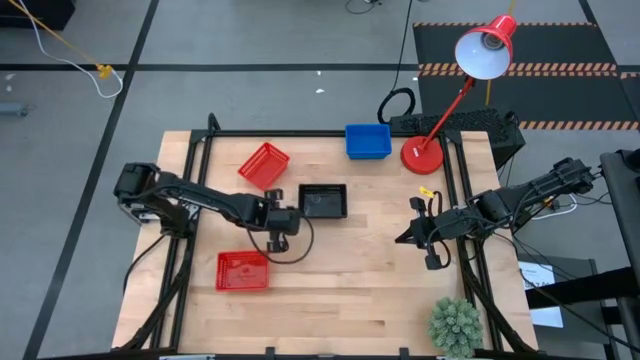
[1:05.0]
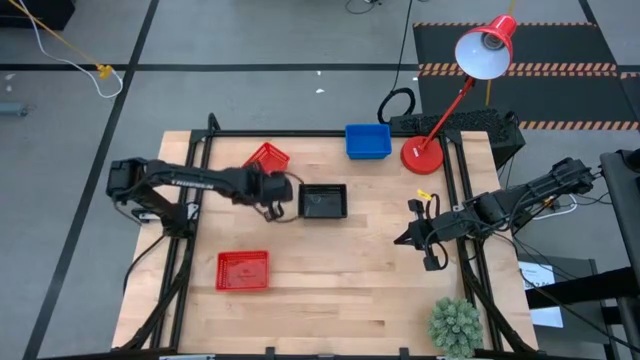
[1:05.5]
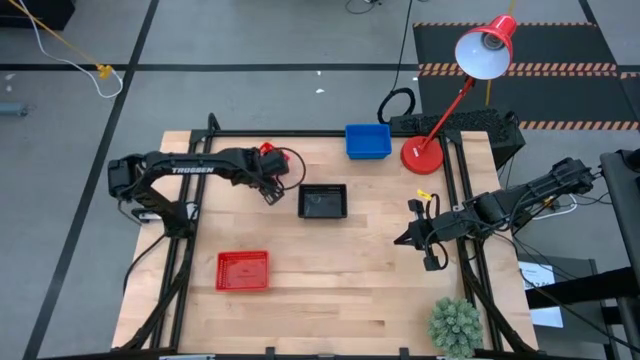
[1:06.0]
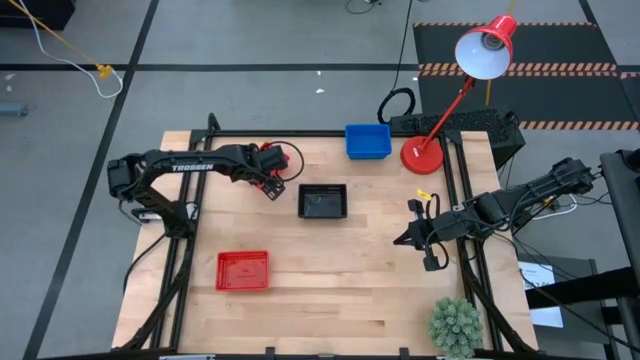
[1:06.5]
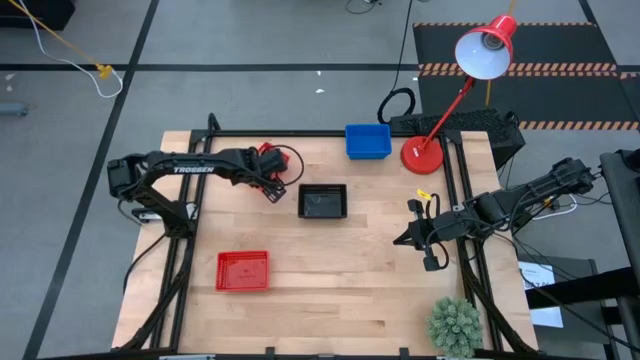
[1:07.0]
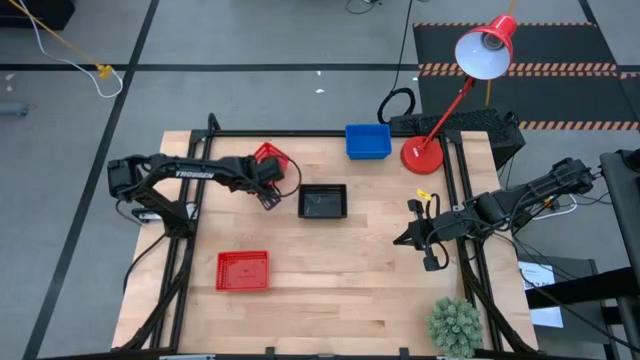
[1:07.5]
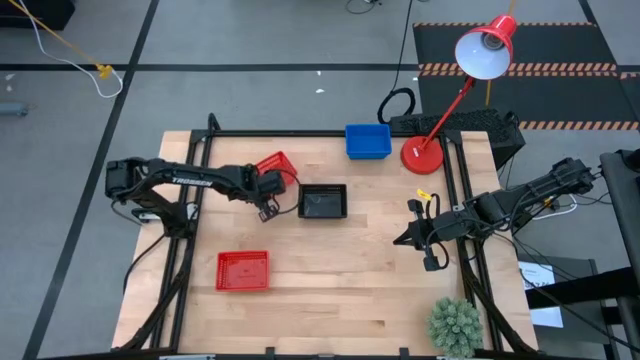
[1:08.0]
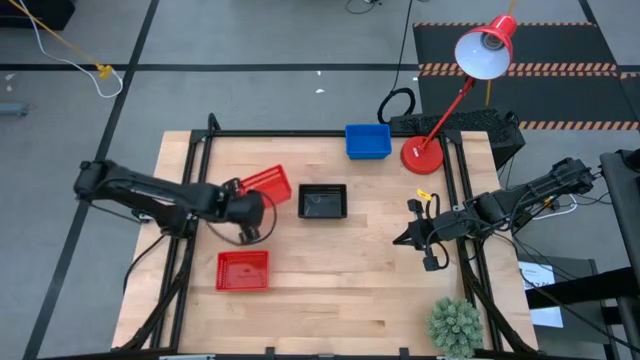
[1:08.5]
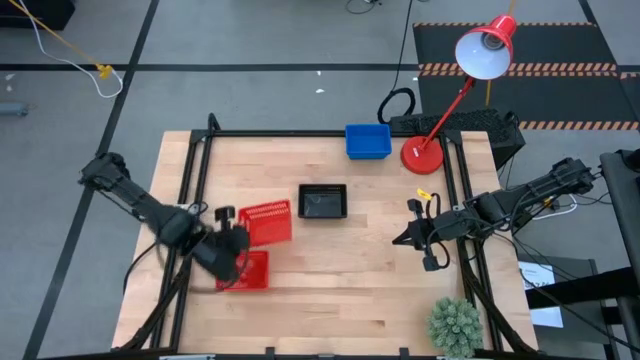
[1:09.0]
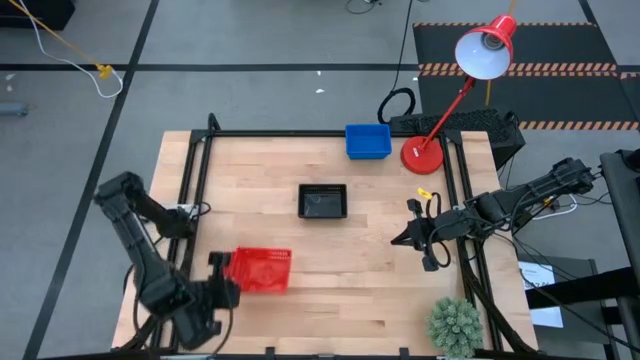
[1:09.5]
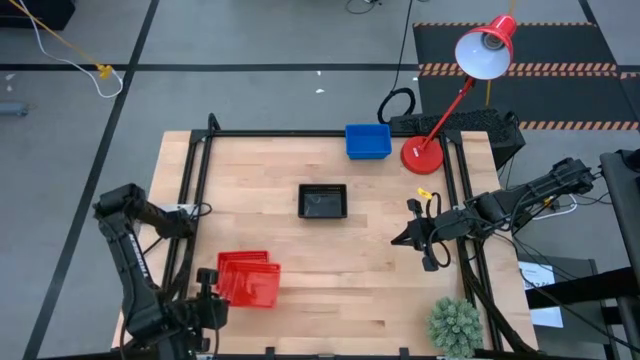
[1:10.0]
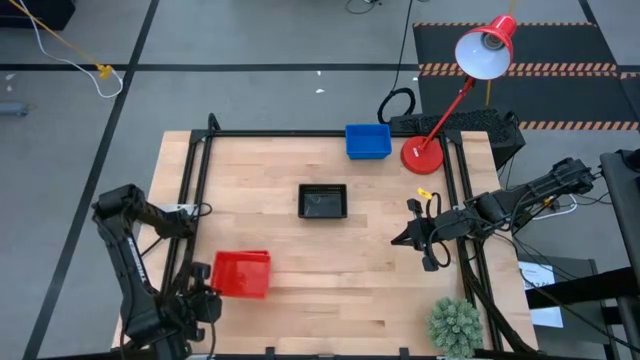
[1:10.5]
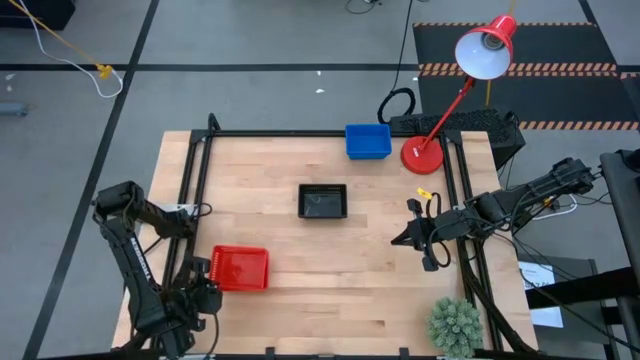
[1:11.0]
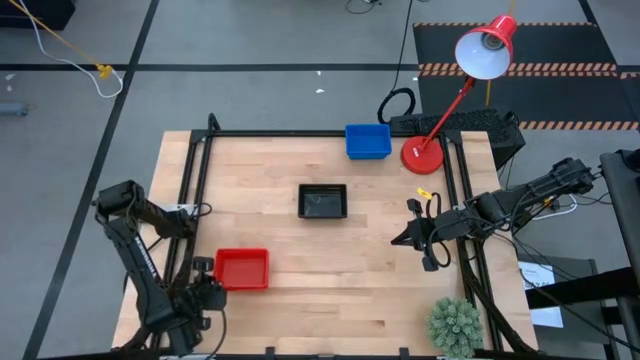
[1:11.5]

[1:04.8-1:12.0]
Stack the top red basket on the stacked red baskets

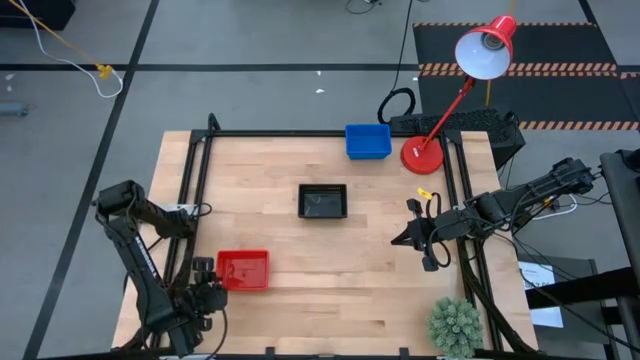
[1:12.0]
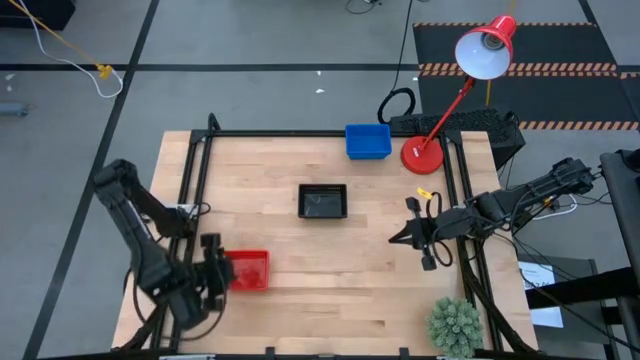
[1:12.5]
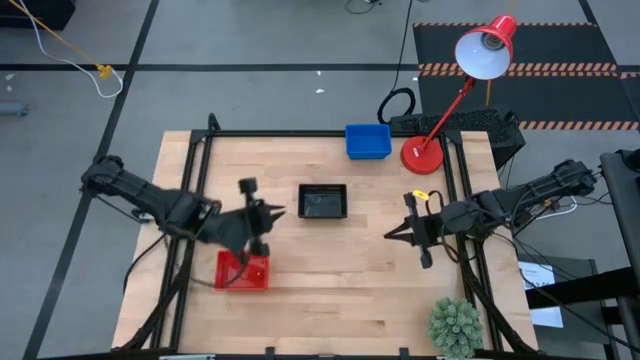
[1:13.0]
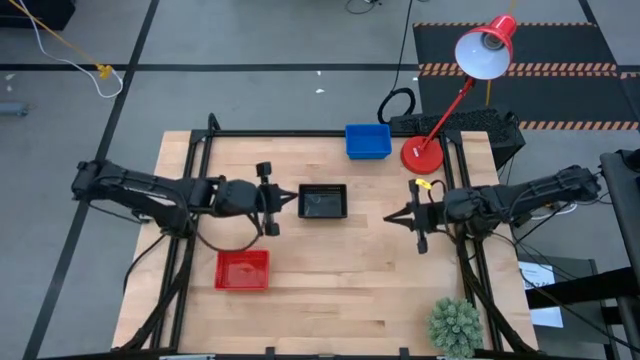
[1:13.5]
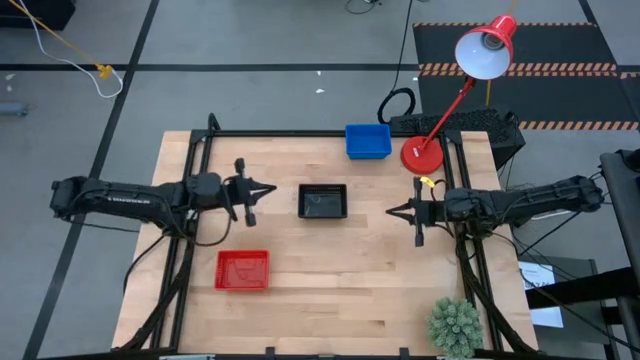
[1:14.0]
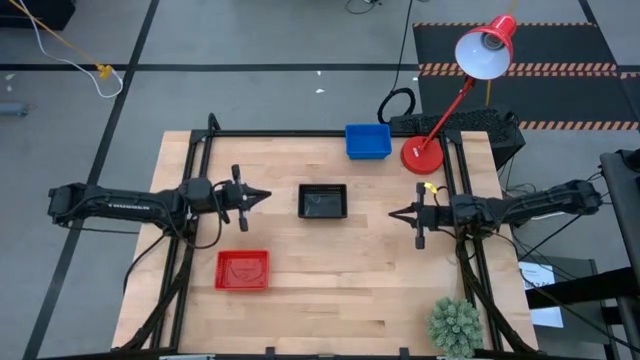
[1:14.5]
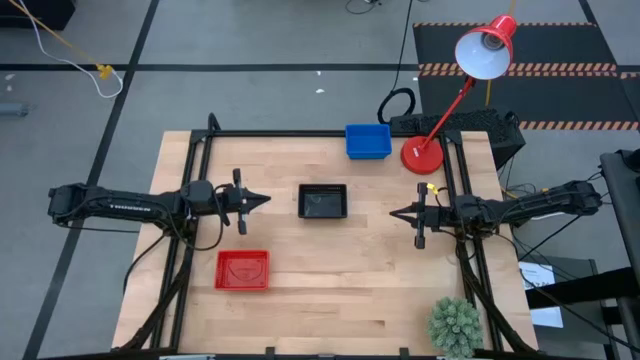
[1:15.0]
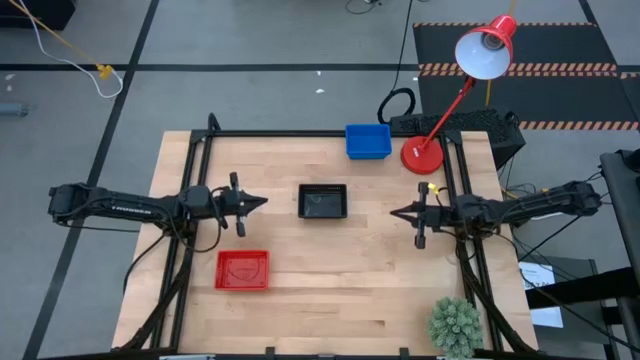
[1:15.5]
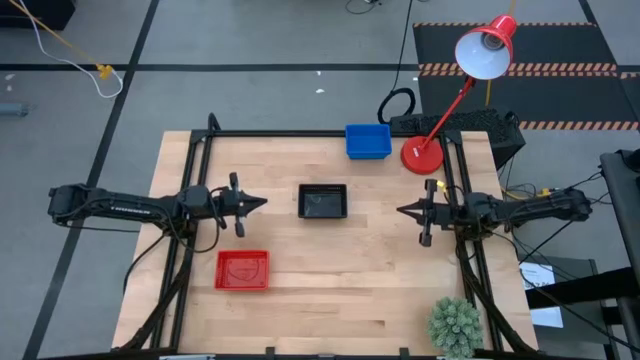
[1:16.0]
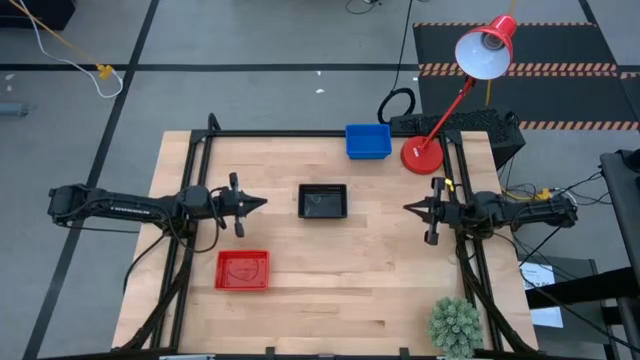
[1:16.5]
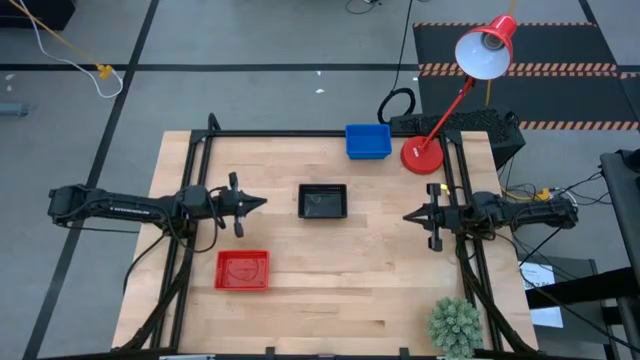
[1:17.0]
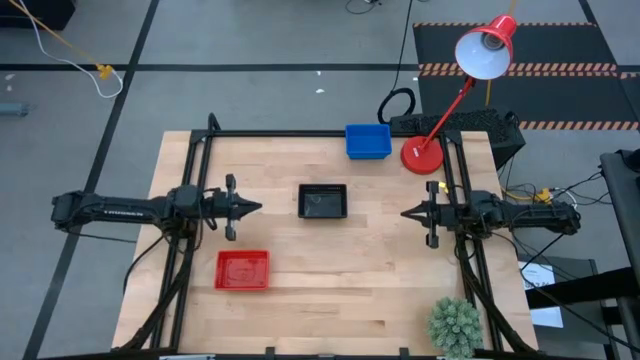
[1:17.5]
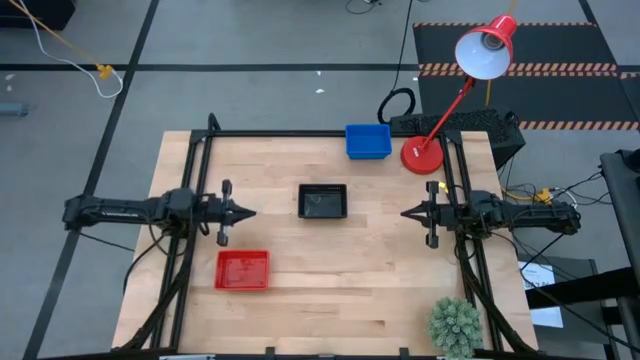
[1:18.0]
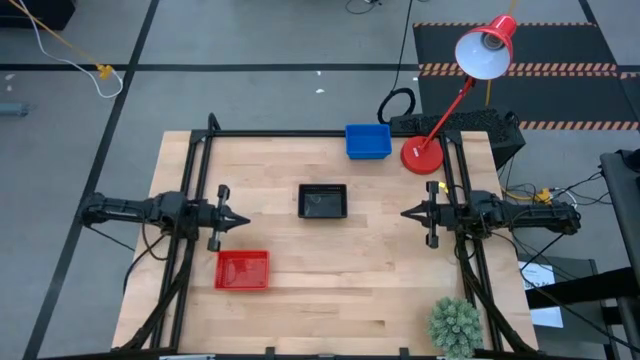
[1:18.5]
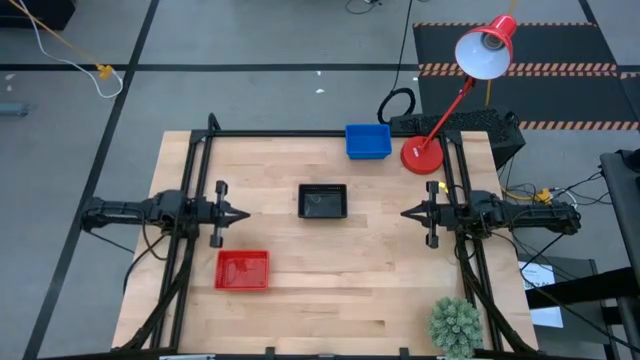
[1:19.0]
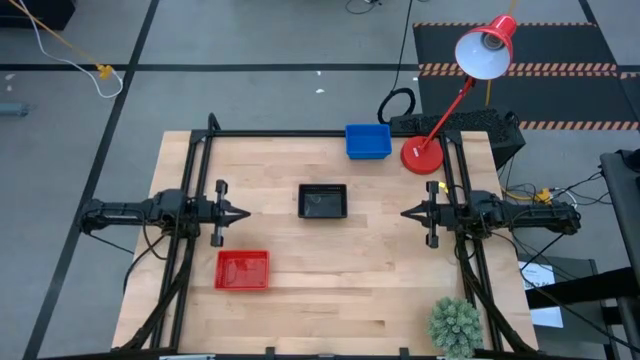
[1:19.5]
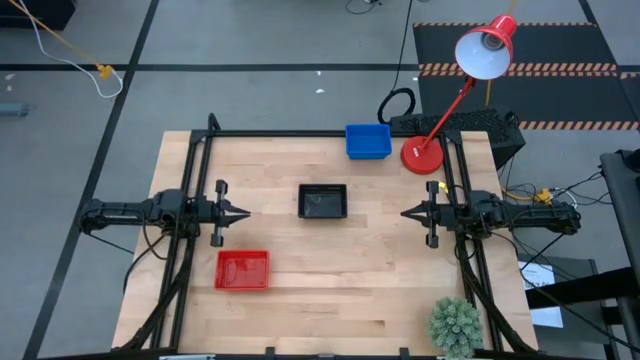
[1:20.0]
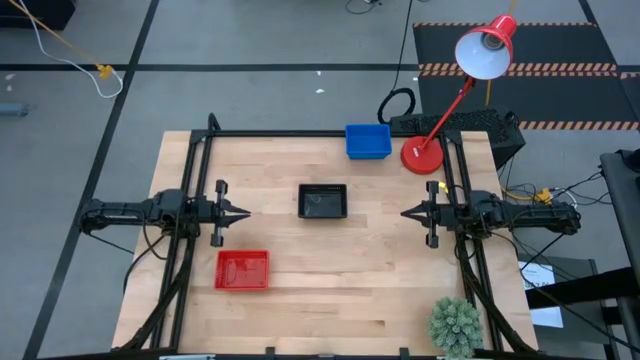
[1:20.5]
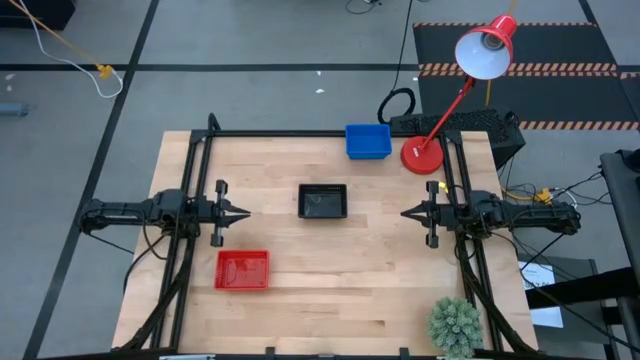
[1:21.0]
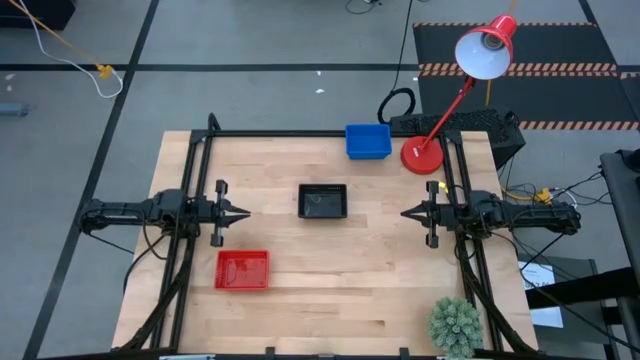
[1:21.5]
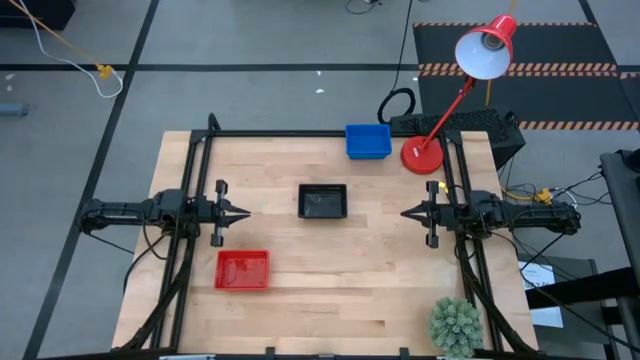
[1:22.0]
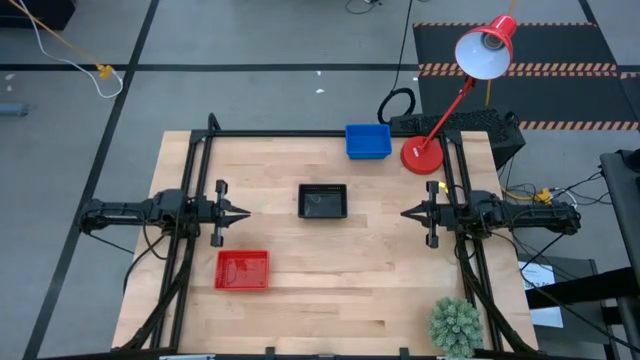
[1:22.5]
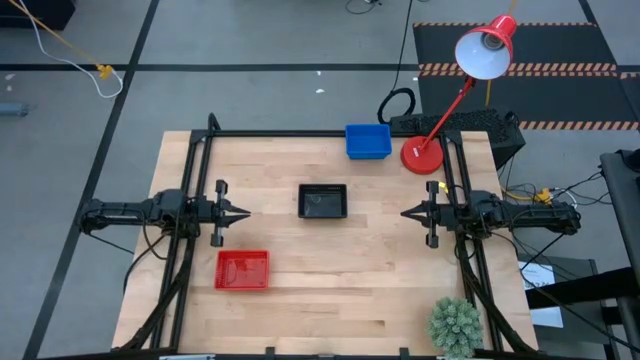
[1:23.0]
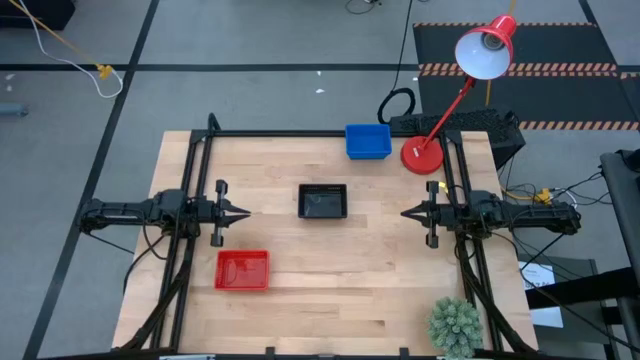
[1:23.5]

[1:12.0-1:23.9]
Return to Home Position
